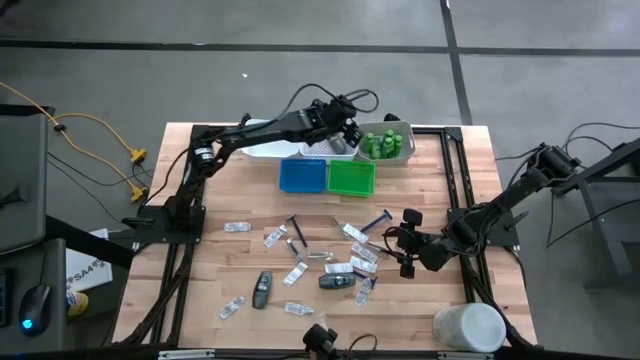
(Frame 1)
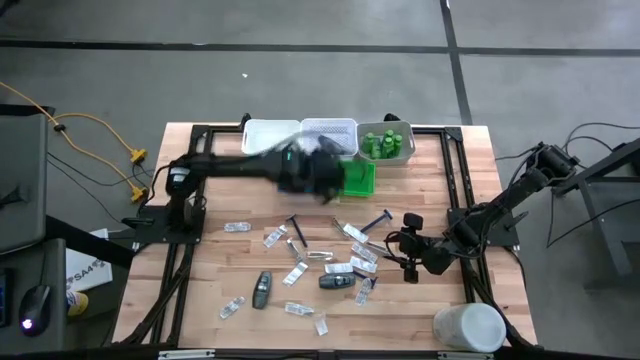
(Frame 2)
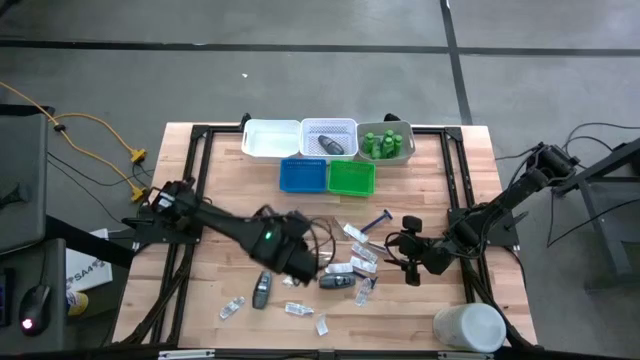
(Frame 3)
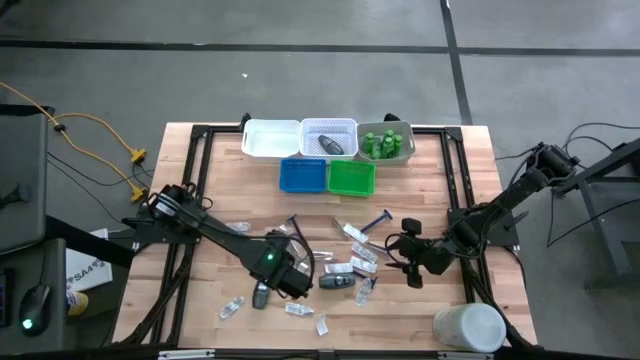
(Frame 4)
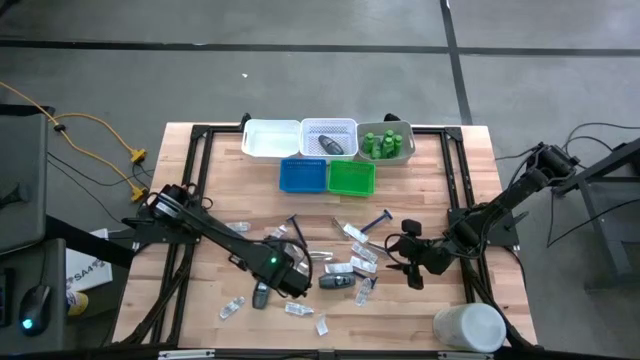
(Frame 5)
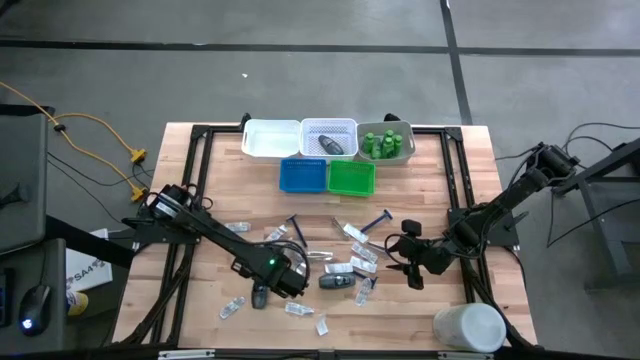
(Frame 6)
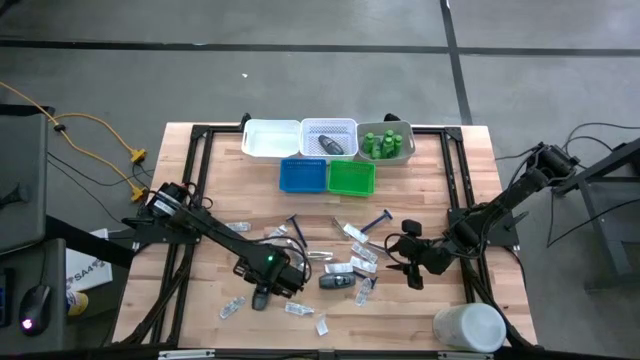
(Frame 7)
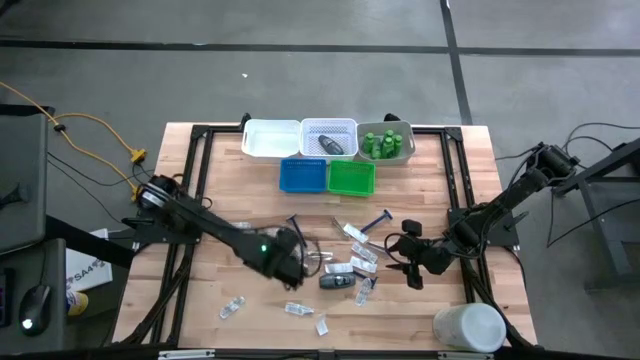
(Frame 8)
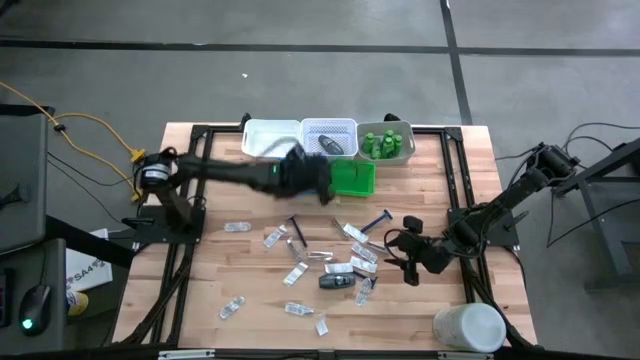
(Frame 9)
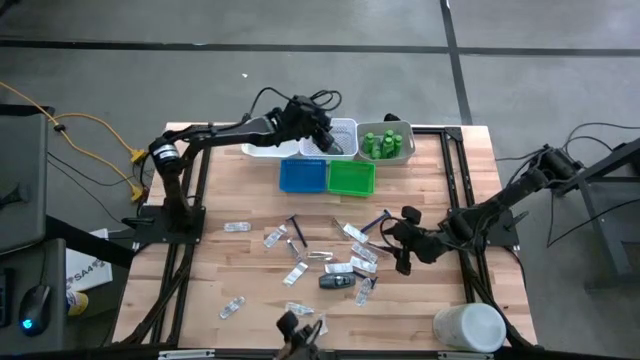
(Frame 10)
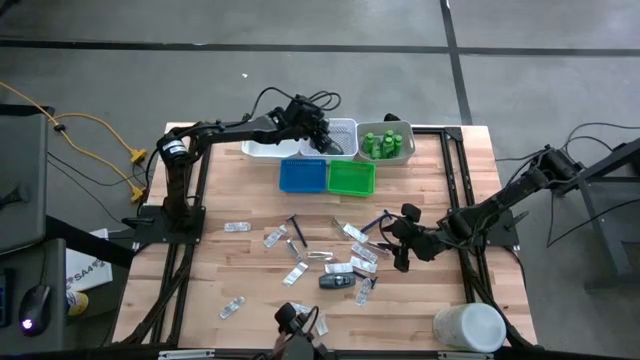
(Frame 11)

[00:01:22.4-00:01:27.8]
Task: Pick & Place Travel size toiletries
Put the black deodorant into the white basket

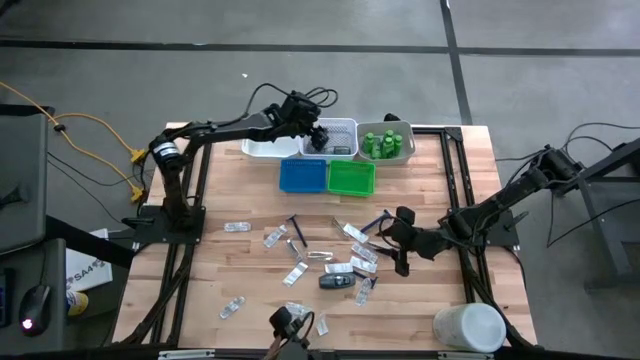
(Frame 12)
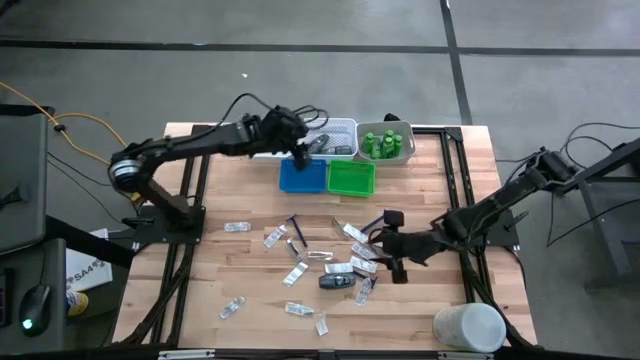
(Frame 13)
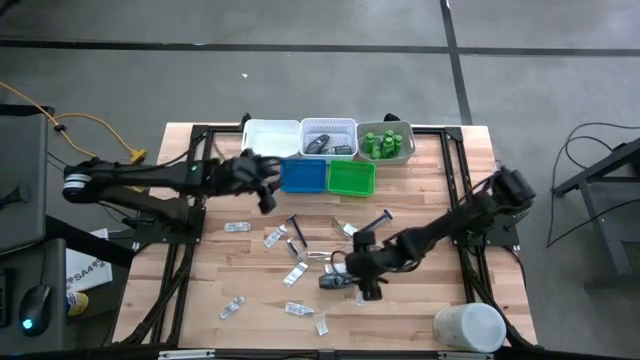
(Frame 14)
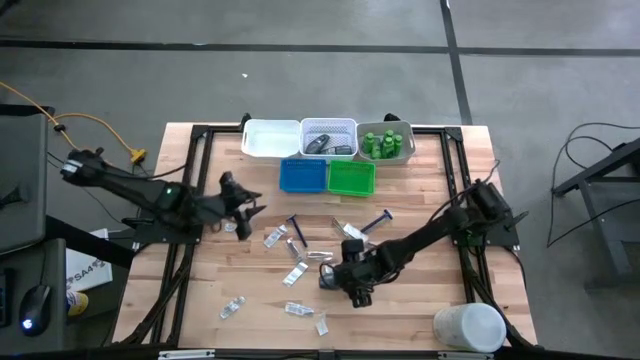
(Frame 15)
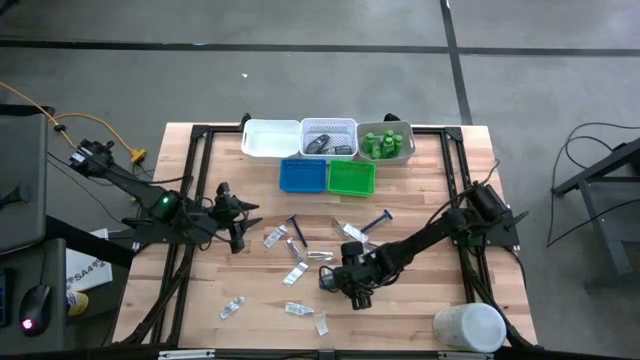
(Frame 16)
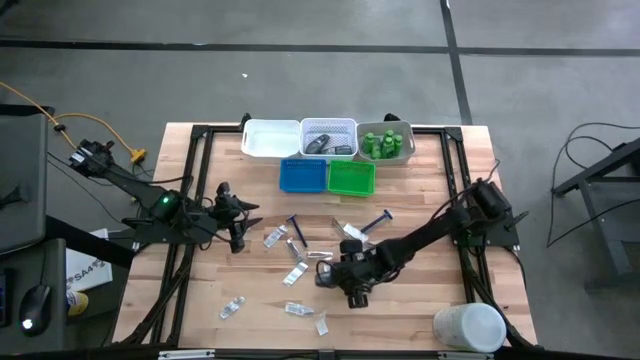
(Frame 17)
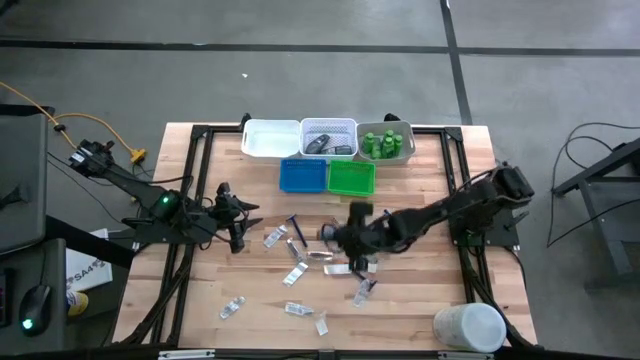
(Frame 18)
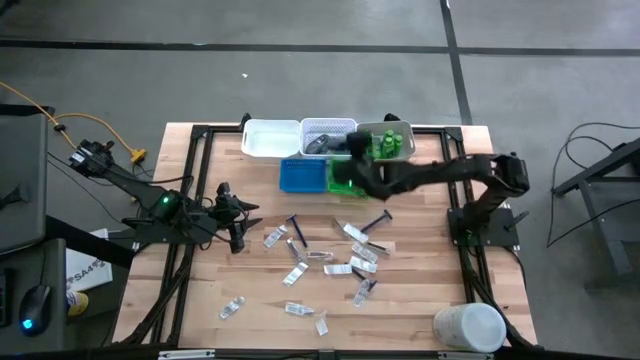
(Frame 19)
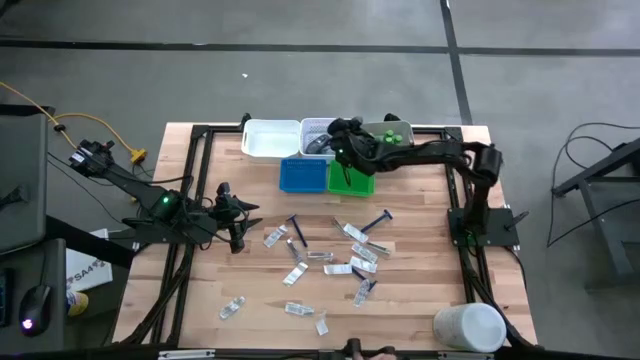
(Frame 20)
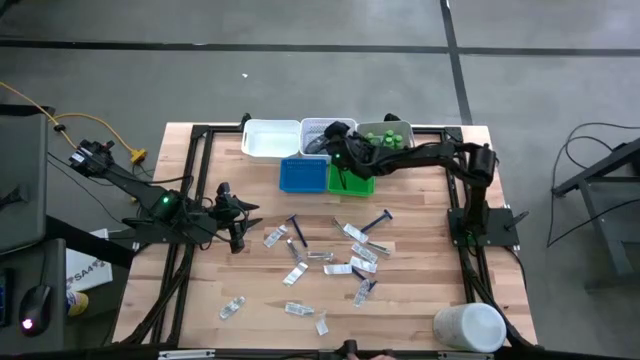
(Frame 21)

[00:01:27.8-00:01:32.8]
Put the black deodorant into the white basket

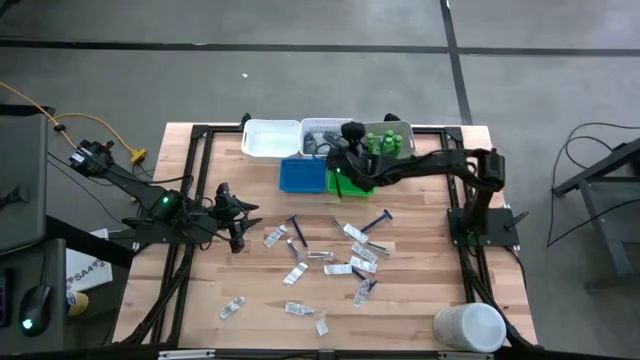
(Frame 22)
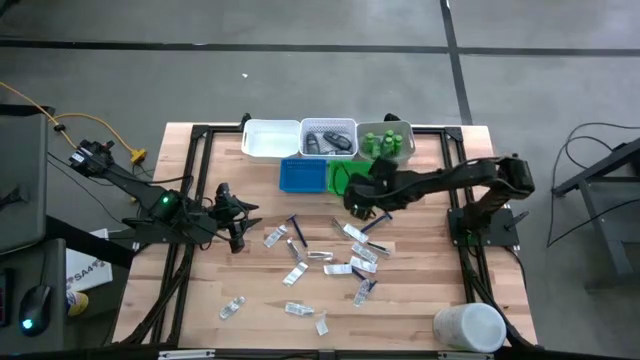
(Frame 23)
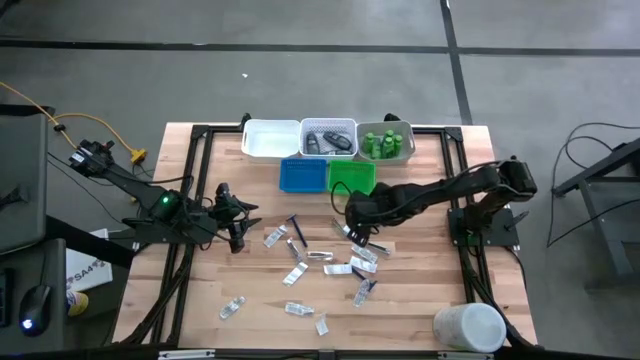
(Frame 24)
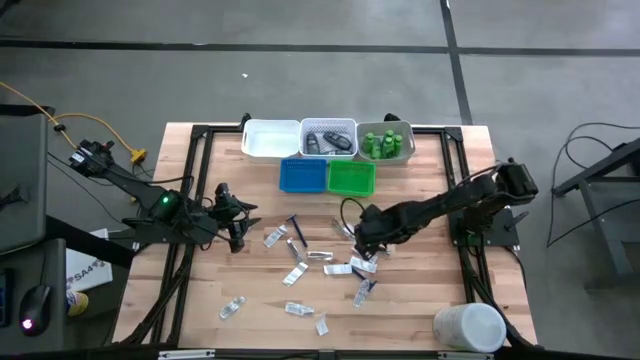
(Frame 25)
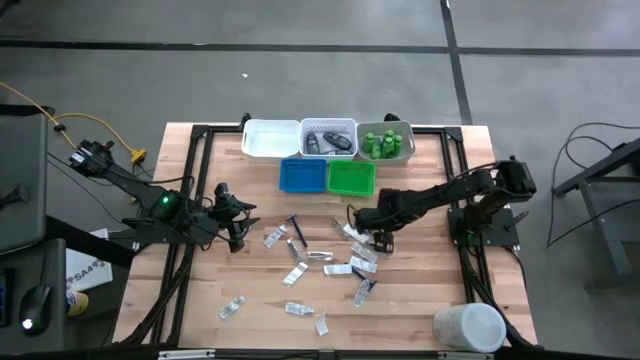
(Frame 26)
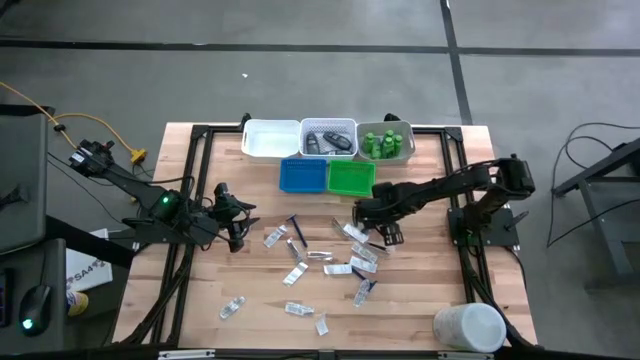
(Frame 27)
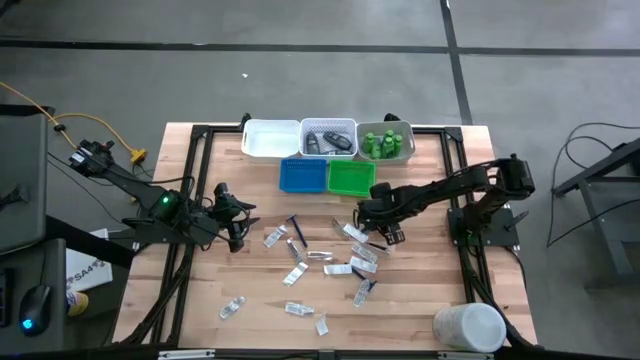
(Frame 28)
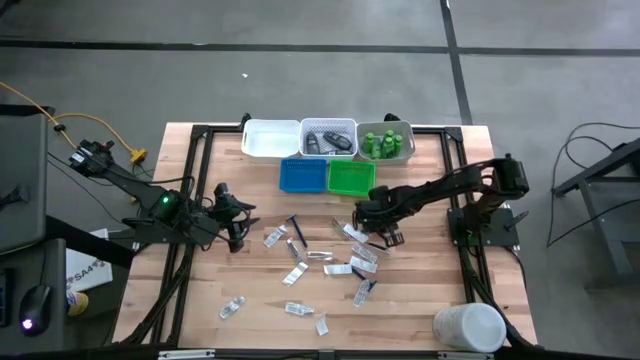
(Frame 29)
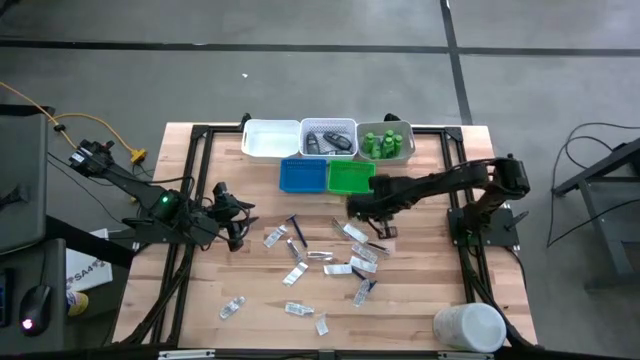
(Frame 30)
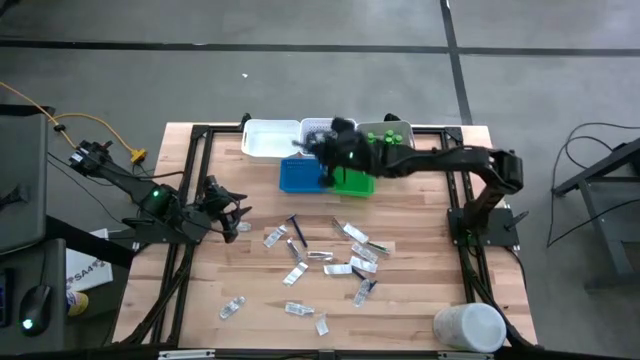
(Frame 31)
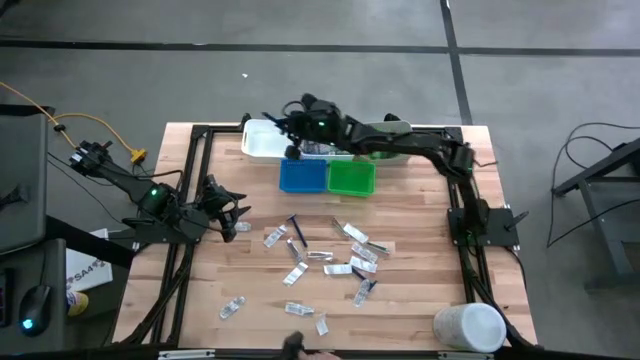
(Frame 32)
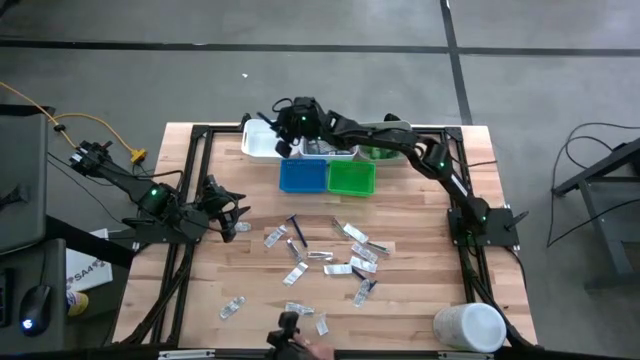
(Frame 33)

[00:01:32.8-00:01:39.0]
Put the blue razor into the white bin

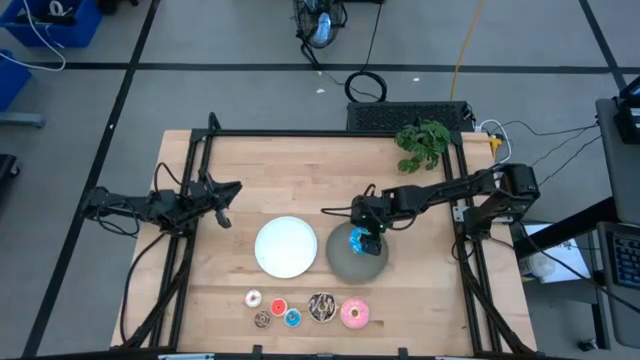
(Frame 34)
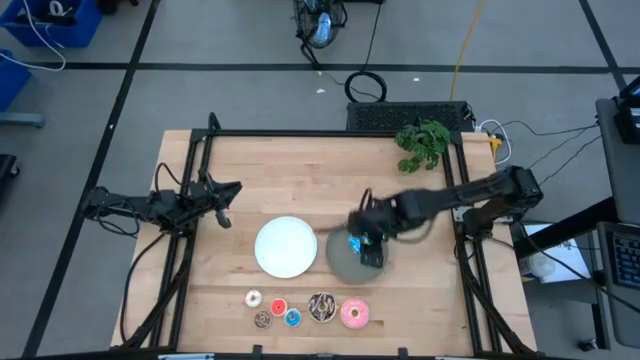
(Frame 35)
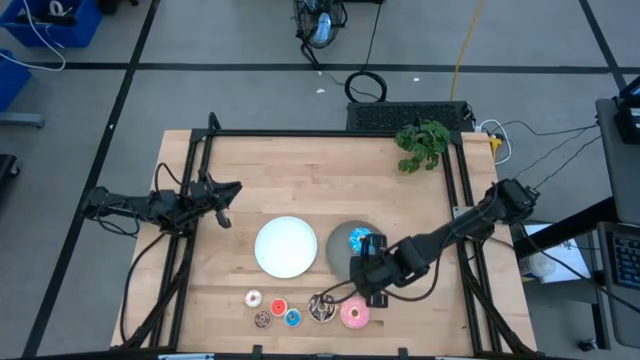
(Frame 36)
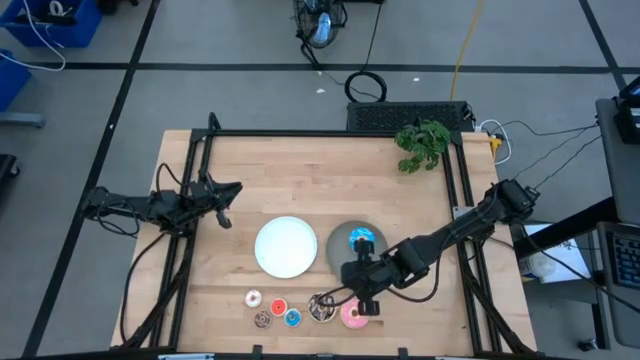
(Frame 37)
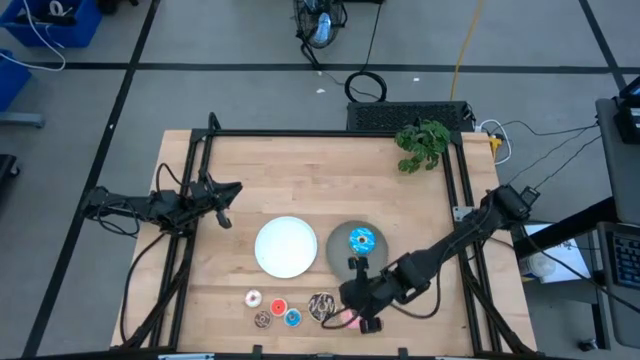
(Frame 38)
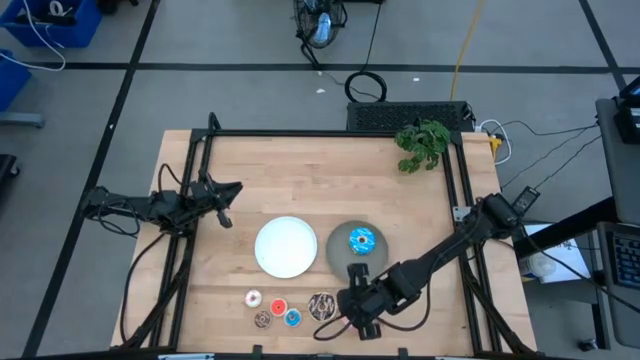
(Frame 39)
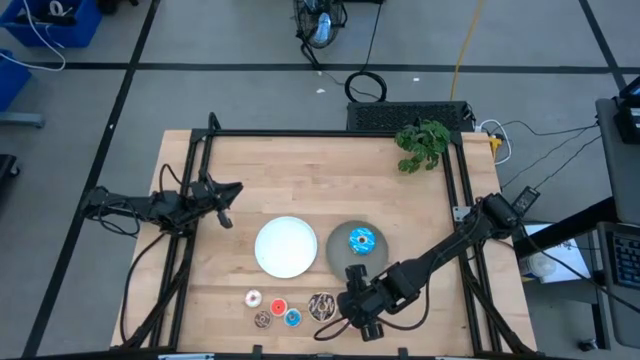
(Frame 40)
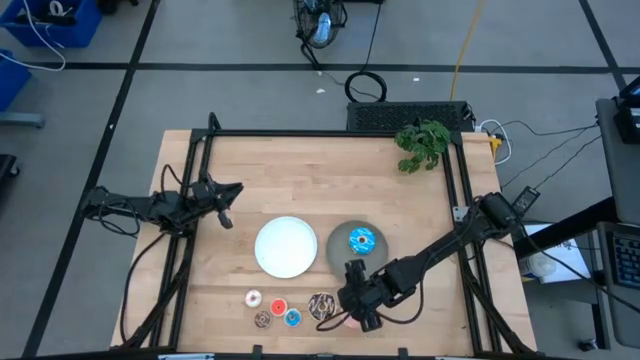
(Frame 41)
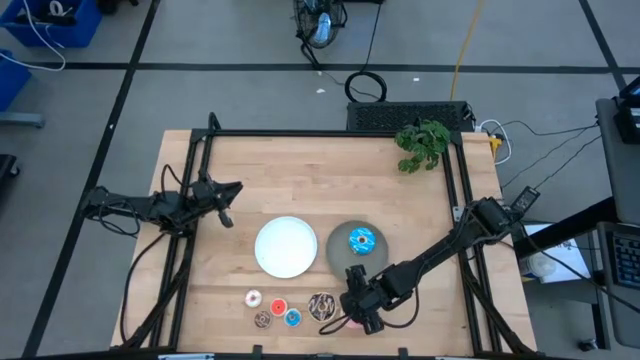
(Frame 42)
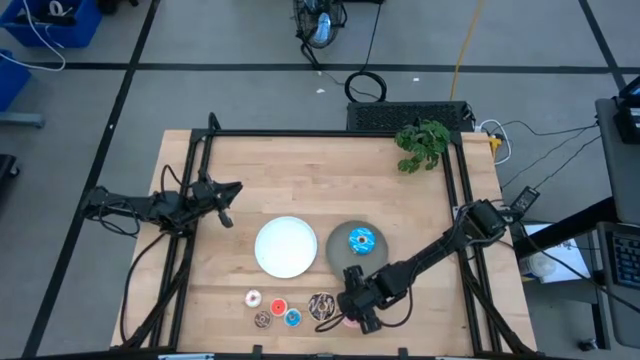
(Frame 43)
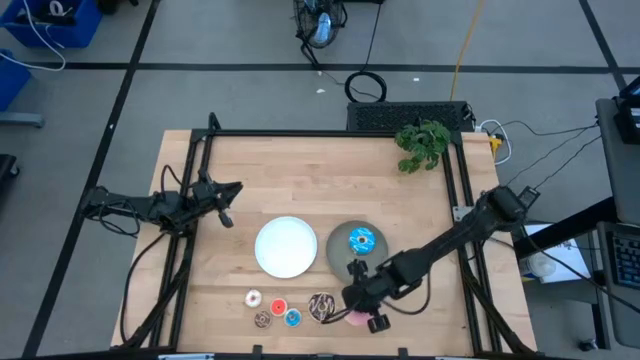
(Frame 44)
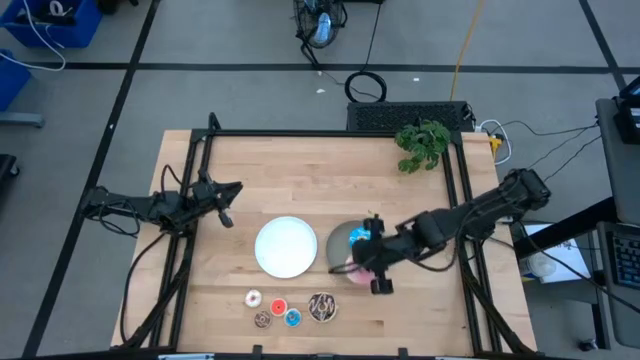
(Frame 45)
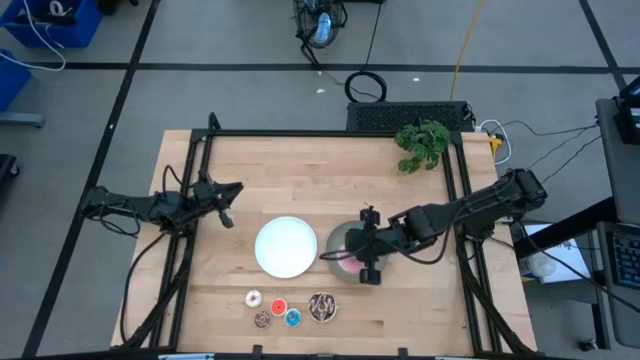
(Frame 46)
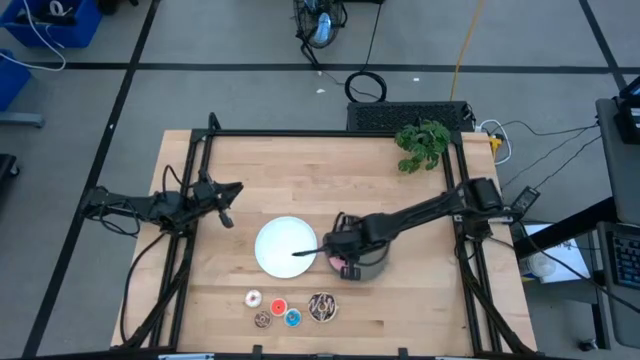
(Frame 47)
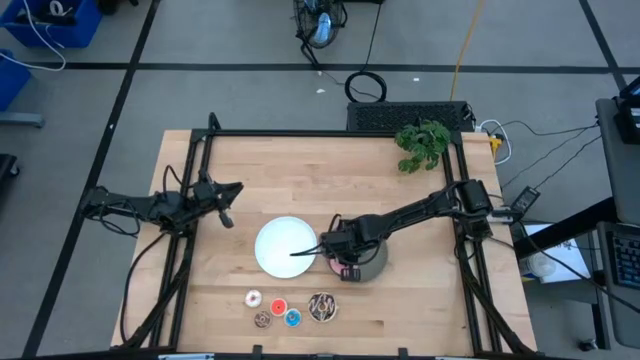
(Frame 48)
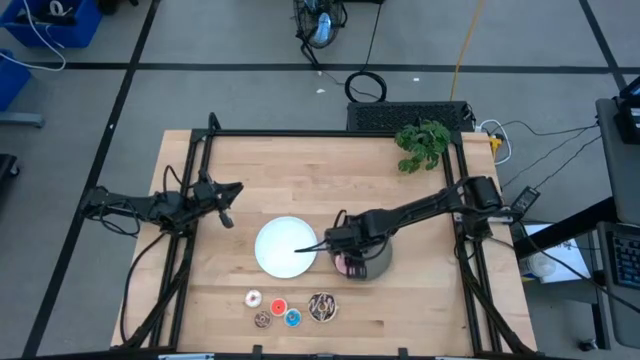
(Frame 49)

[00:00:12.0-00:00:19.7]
Task: Pick & Place donuts
Put the large pink donut on the gray plate
